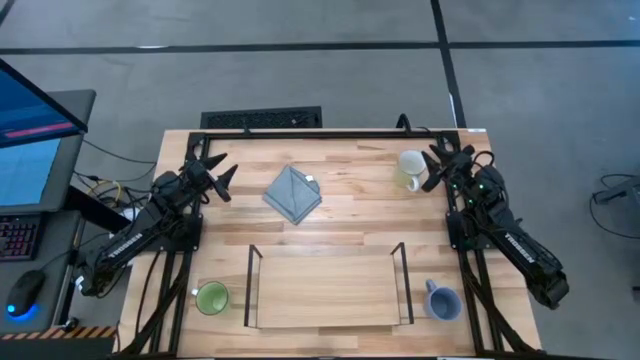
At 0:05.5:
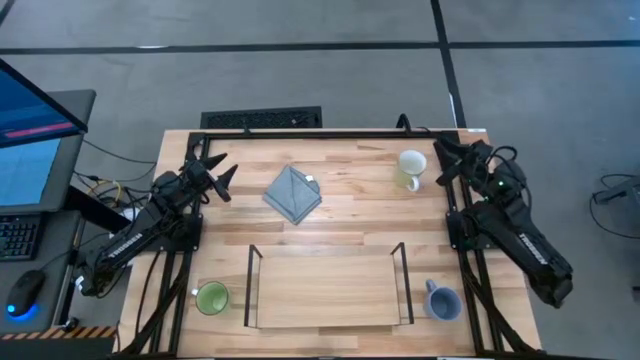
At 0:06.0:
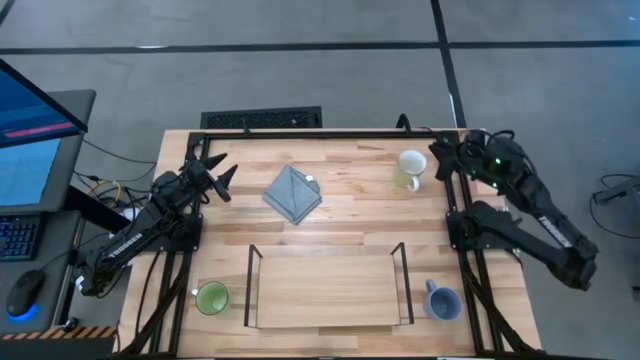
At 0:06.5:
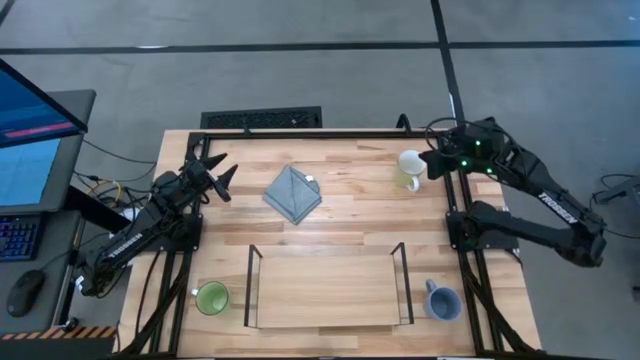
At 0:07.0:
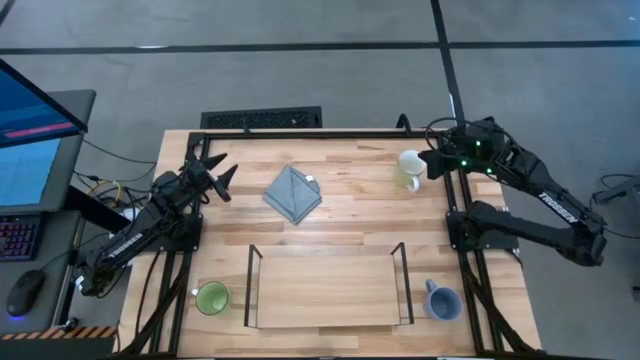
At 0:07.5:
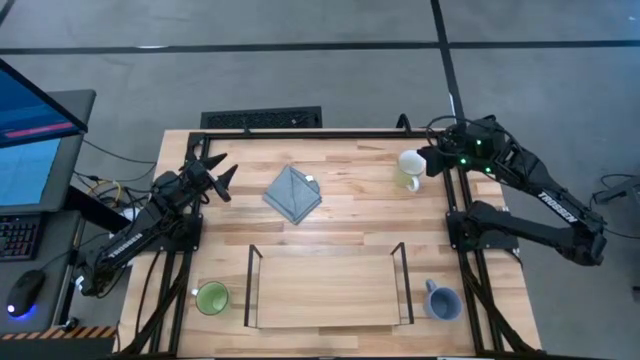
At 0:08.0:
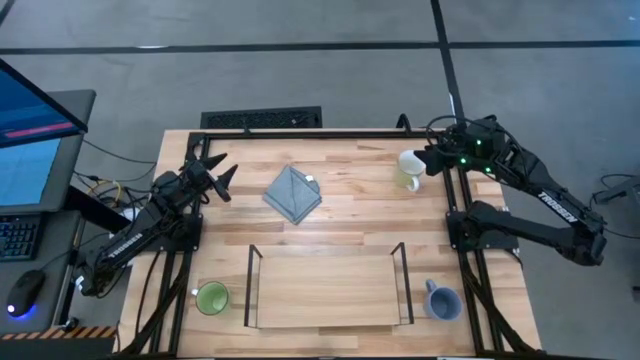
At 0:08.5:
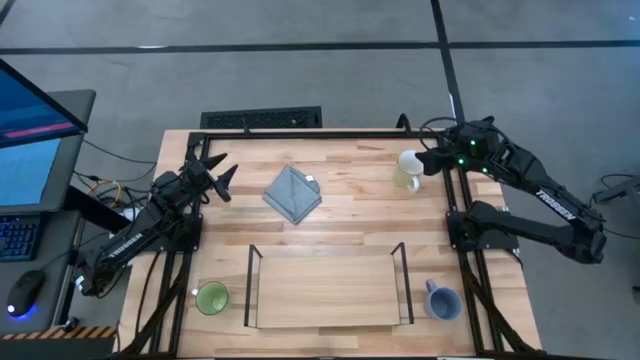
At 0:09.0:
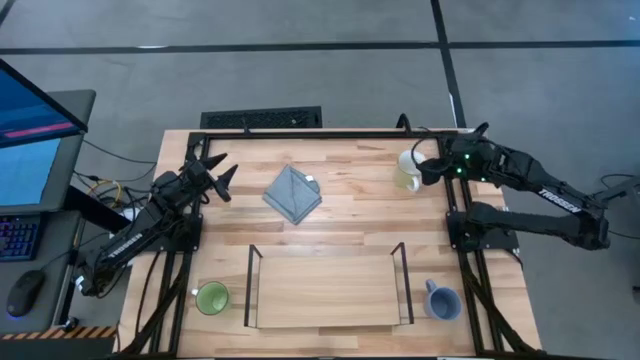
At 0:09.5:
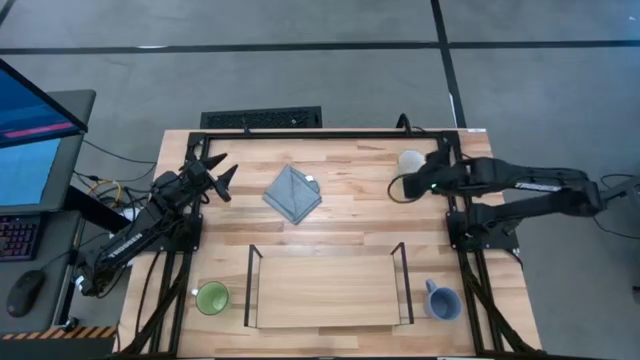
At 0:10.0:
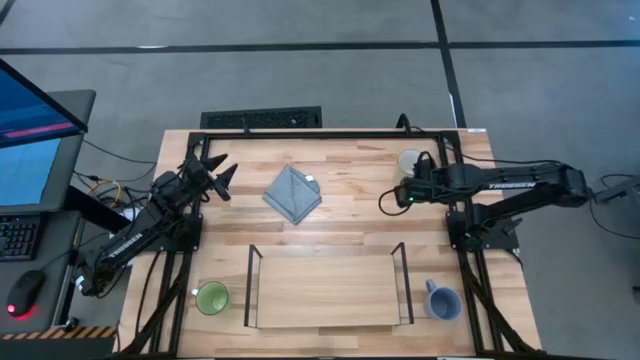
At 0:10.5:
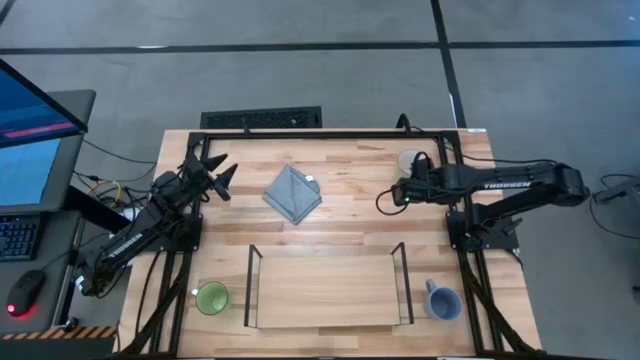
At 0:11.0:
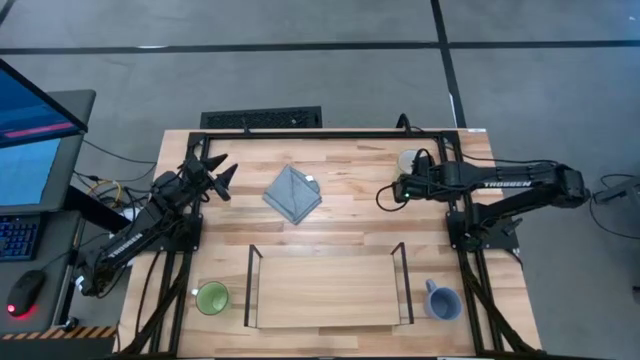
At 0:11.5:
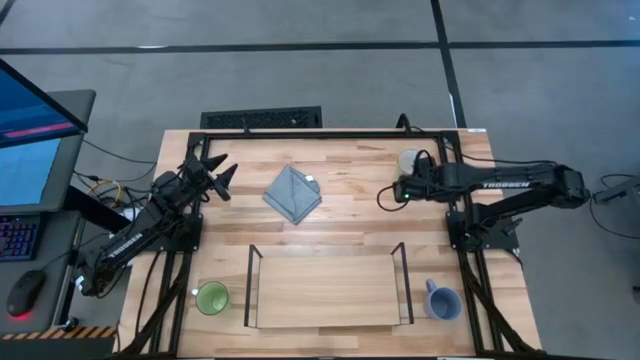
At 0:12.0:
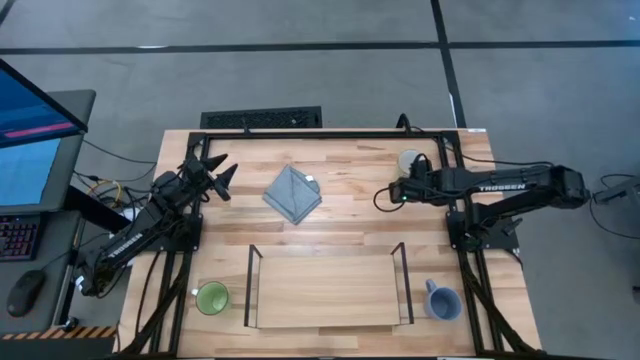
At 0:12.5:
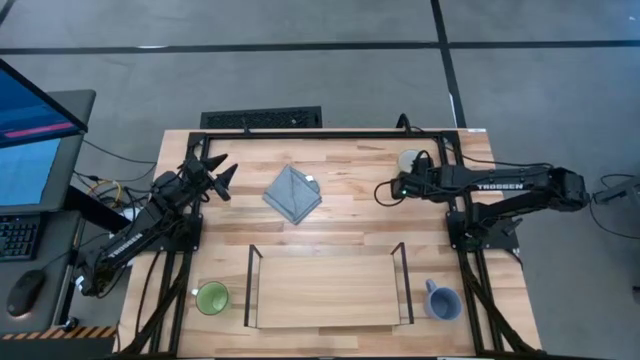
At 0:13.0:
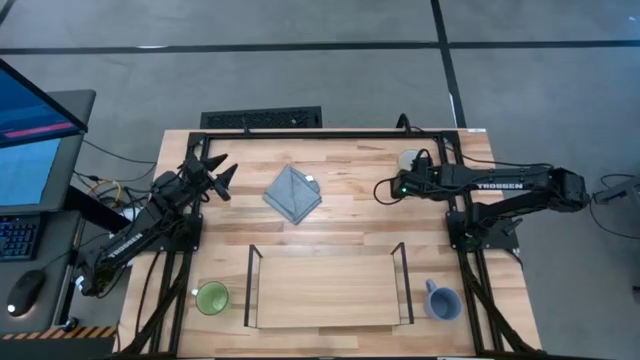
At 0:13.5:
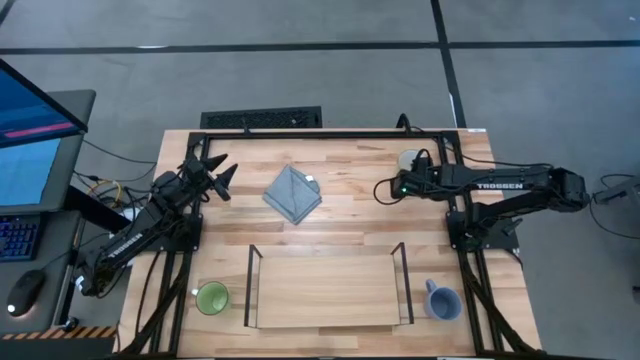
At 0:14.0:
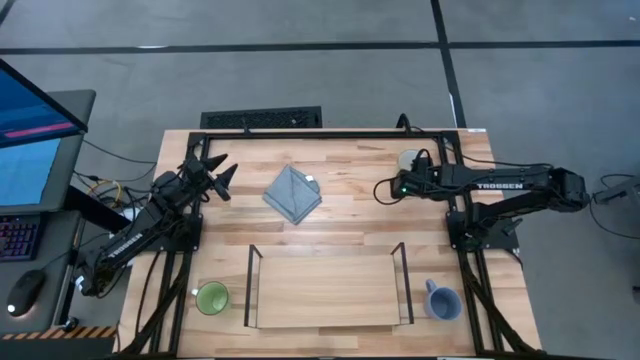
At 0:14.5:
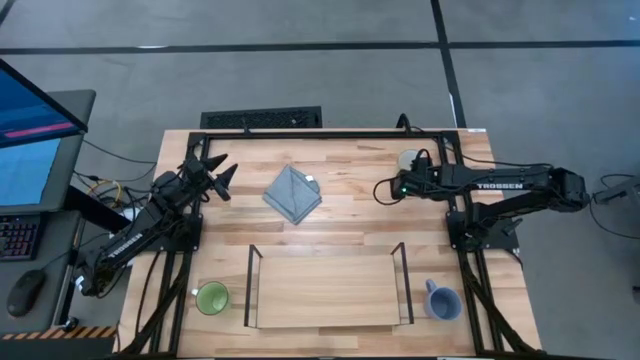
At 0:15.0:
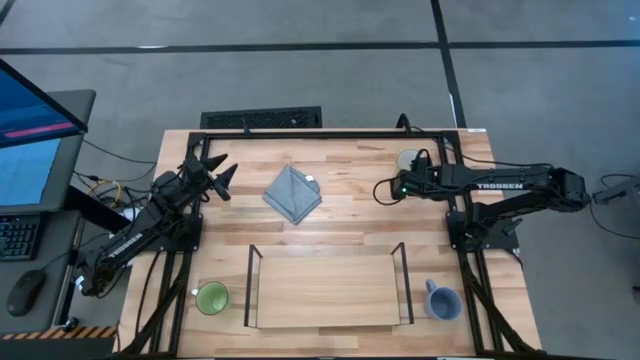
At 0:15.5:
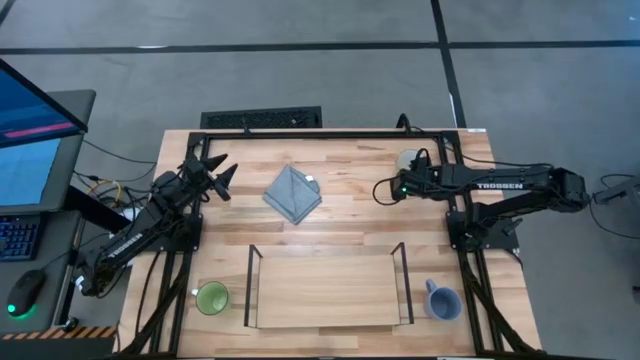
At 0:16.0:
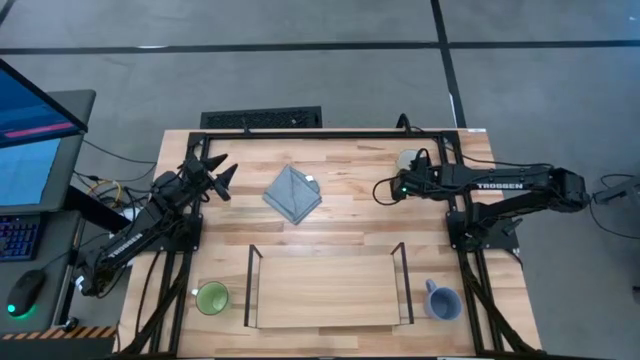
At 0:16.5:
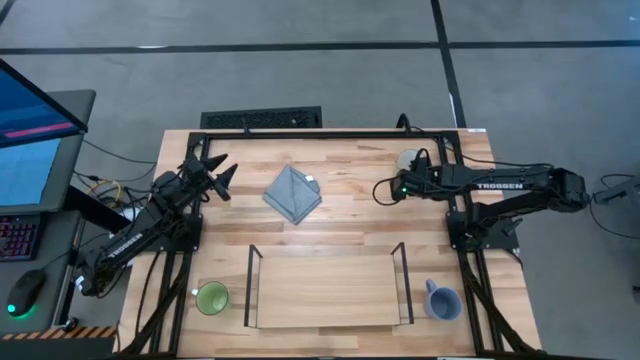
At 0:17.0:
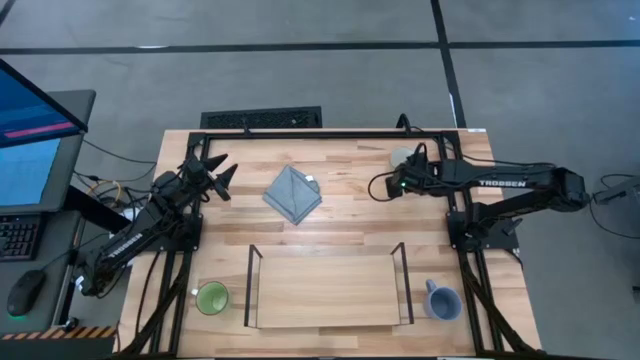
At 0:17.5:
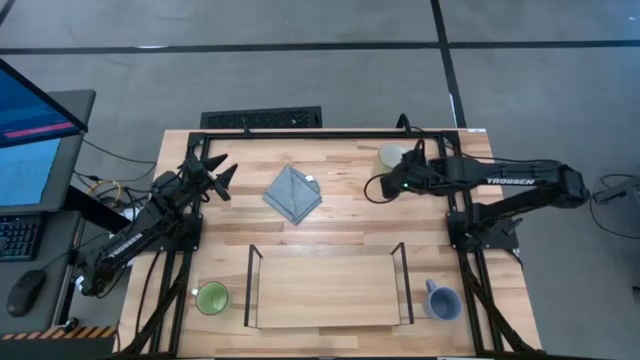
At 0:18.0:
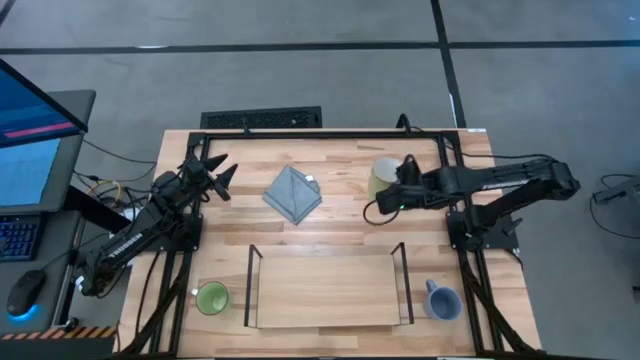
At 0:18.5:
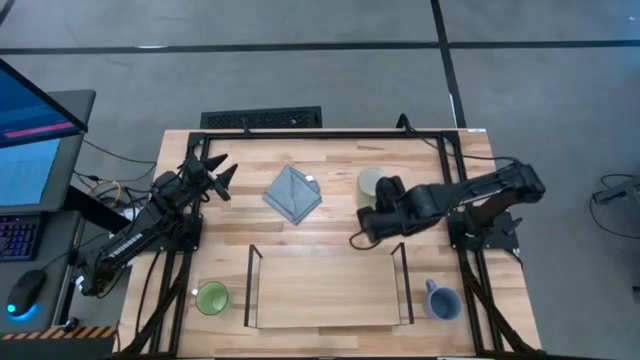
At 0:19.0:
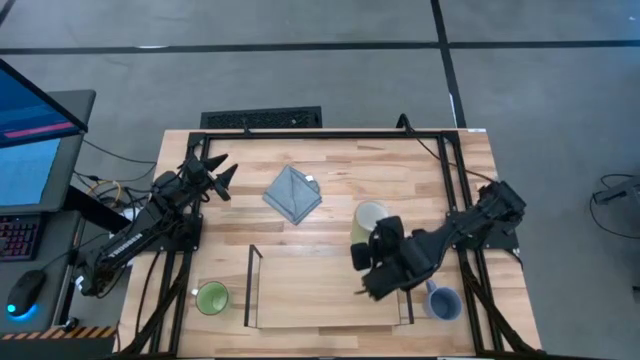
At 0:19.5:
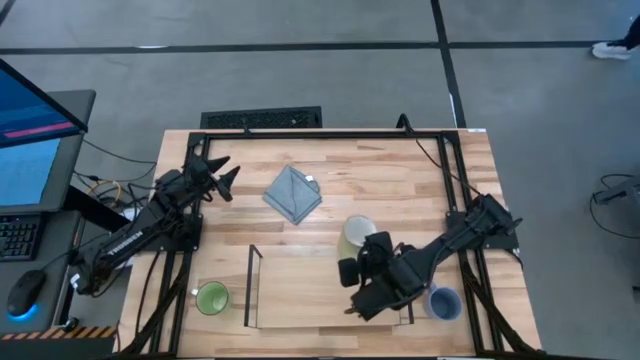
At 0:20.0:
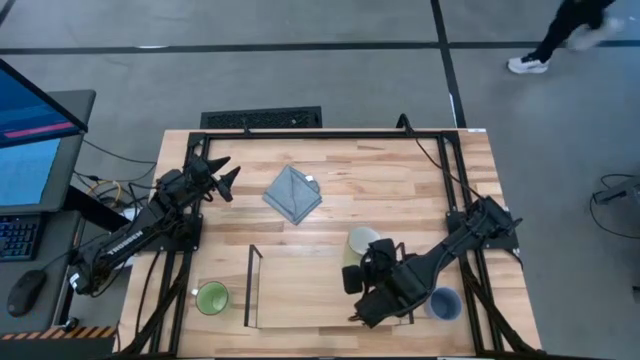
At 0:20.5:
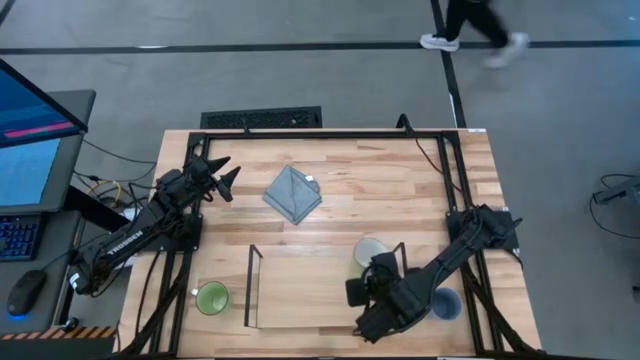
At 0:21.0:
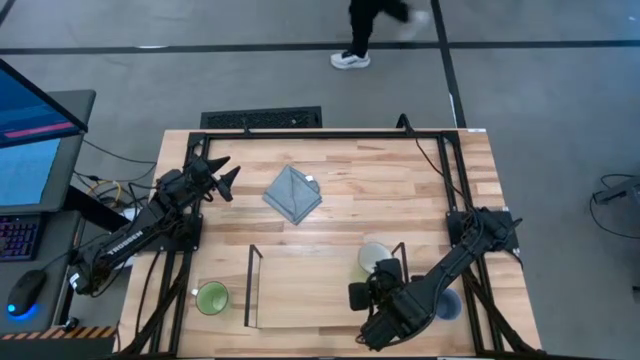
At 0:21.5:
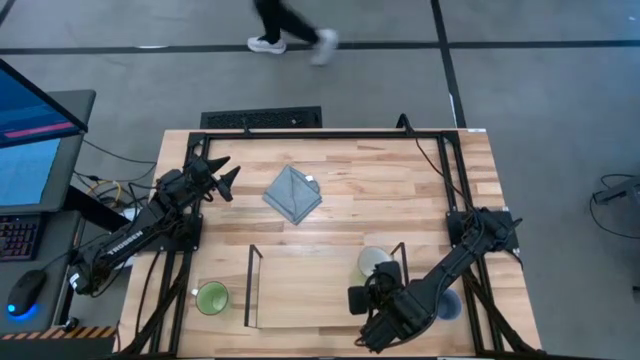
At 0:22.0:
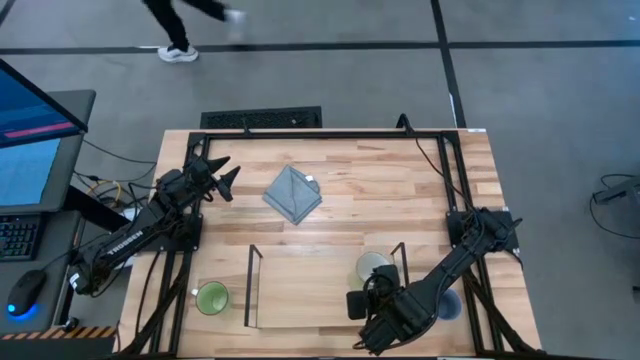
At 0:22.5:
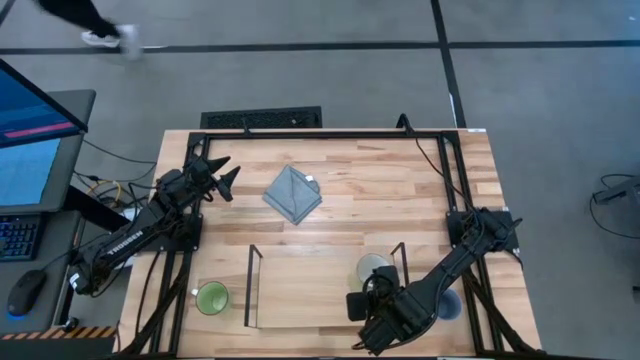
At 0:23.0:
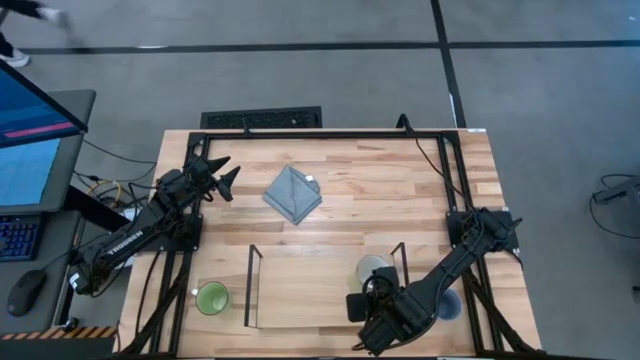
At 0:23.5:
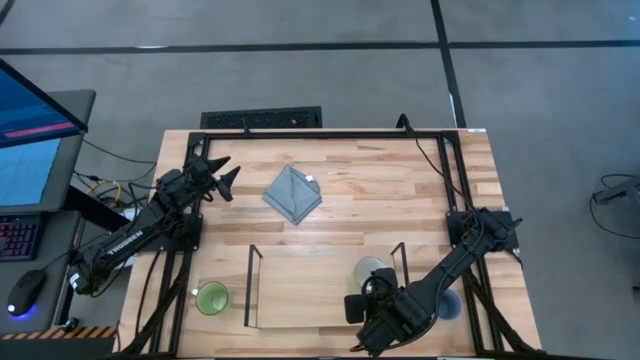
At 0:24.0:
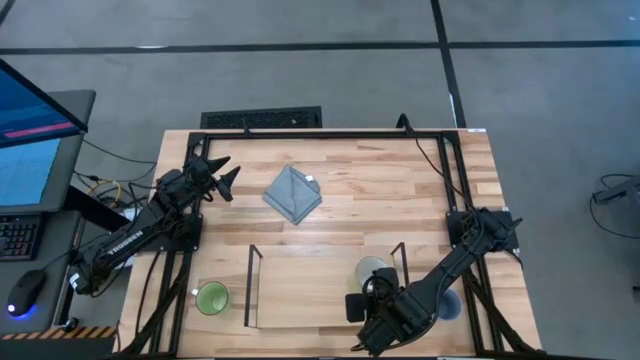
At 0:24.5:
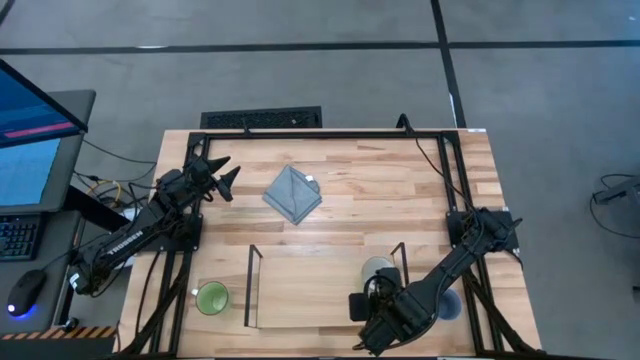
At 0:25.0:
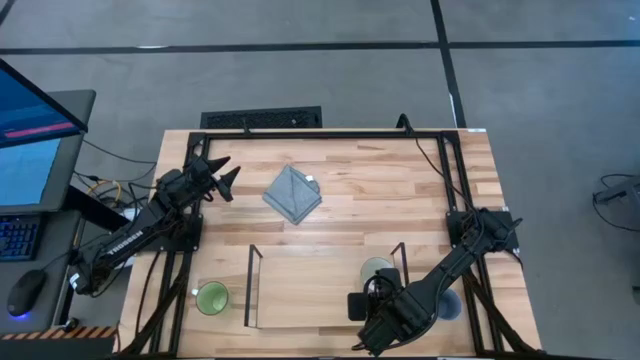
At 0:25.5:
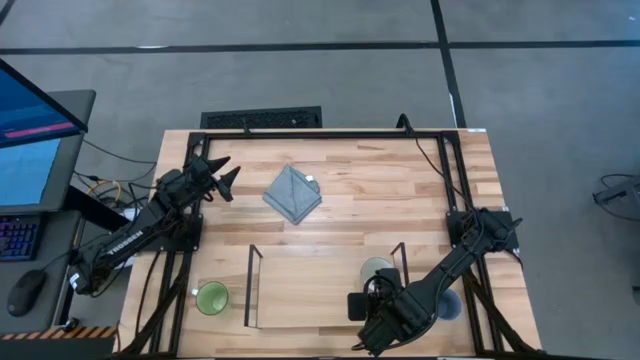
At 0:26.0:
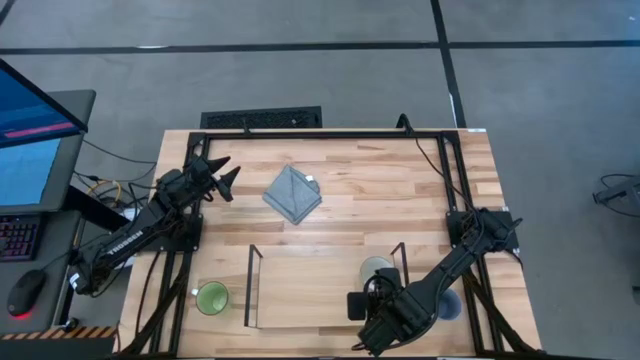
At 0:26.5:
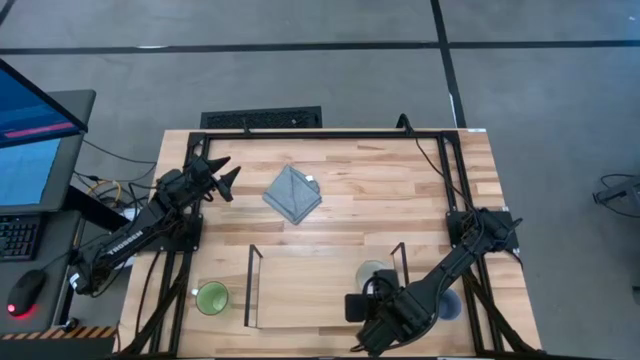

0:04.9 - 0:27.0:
Task: Stack small to large cups/mugs on shelf
Put the light green mug on the shelf
